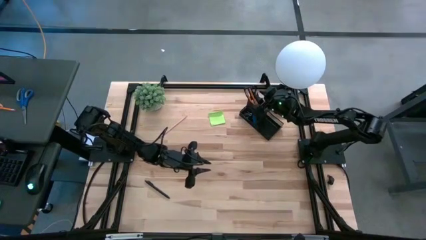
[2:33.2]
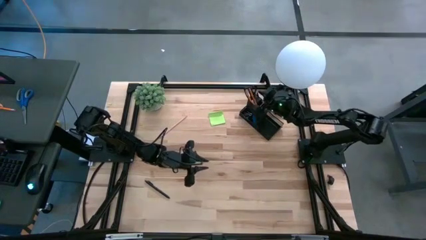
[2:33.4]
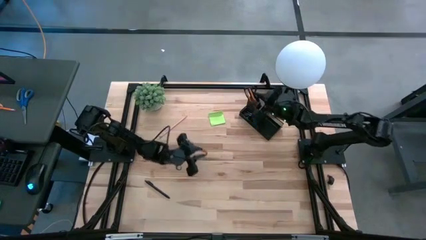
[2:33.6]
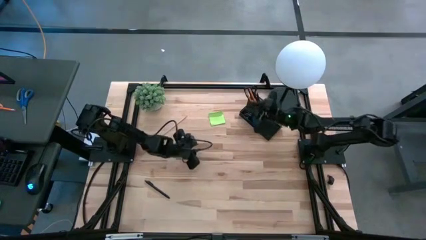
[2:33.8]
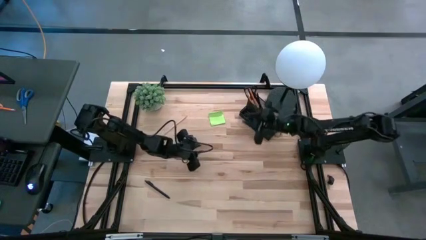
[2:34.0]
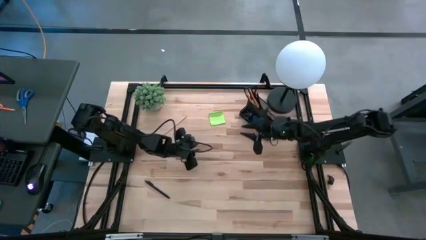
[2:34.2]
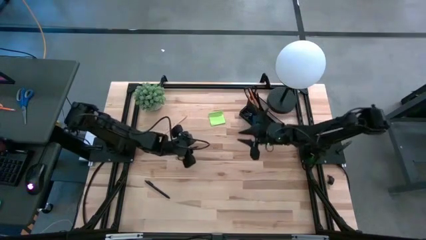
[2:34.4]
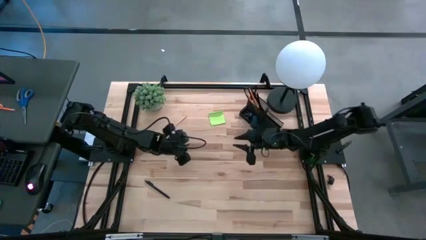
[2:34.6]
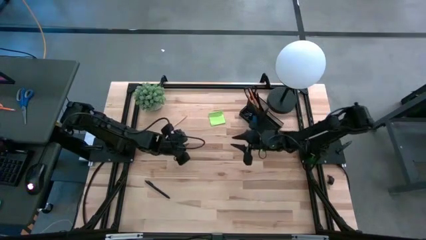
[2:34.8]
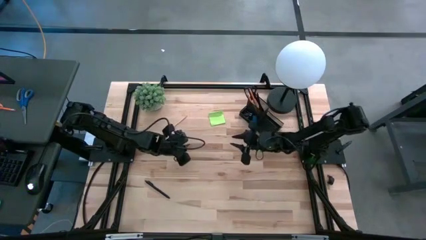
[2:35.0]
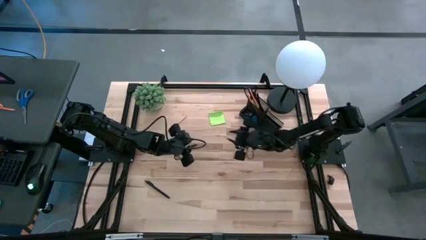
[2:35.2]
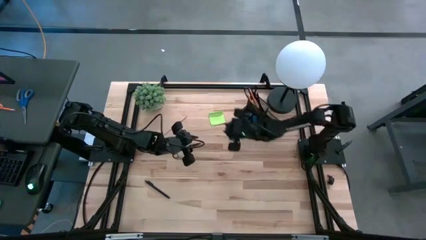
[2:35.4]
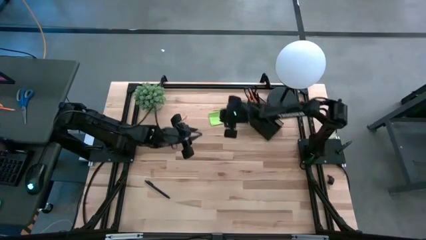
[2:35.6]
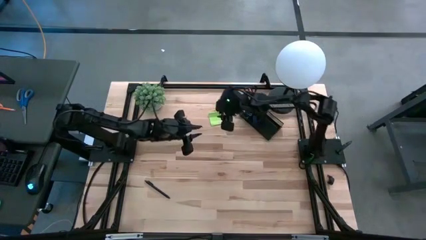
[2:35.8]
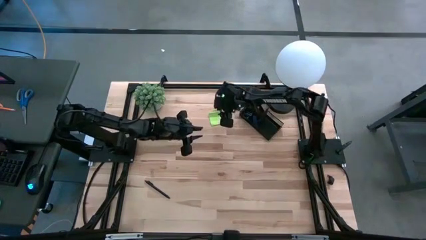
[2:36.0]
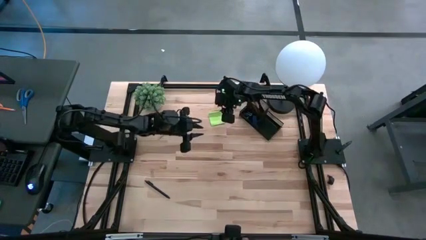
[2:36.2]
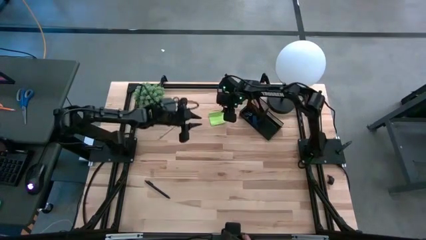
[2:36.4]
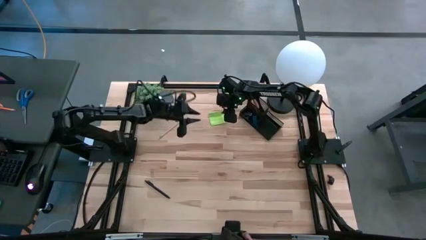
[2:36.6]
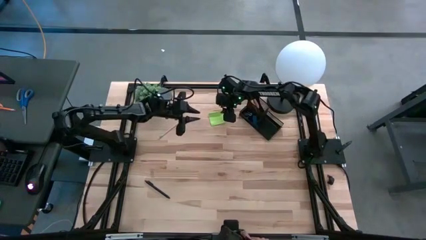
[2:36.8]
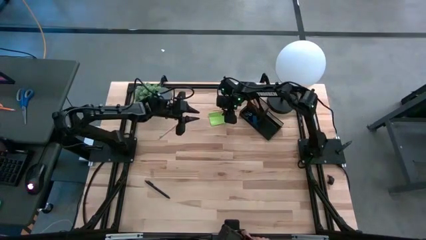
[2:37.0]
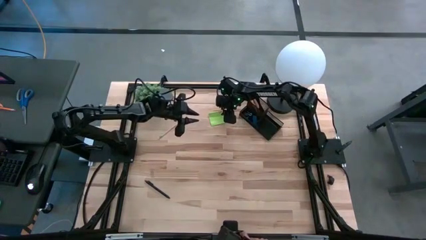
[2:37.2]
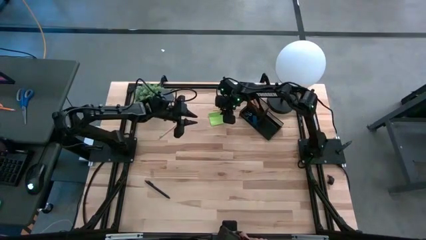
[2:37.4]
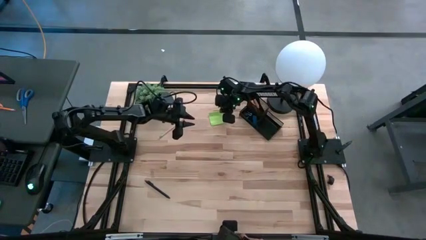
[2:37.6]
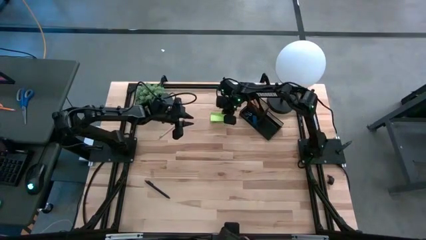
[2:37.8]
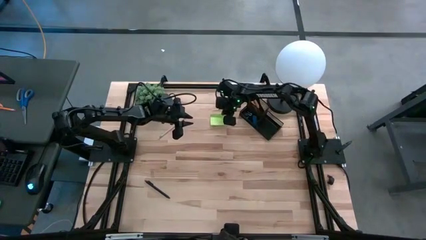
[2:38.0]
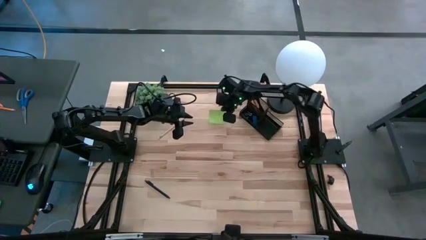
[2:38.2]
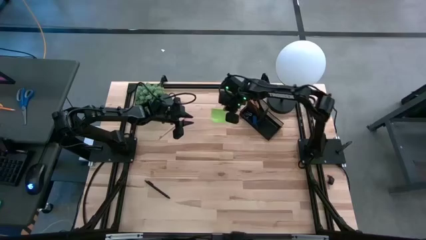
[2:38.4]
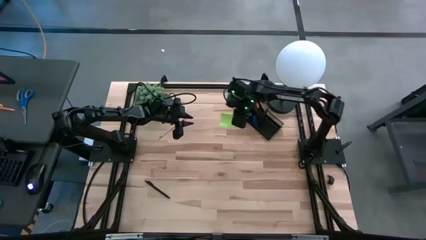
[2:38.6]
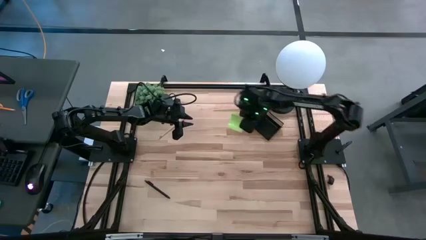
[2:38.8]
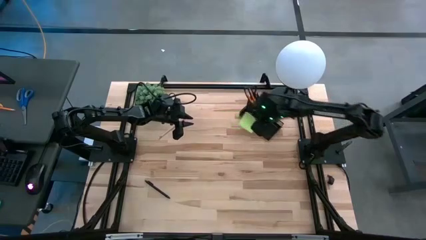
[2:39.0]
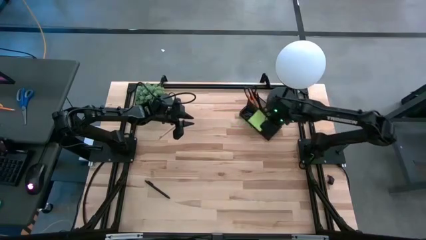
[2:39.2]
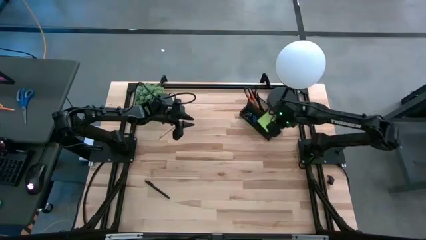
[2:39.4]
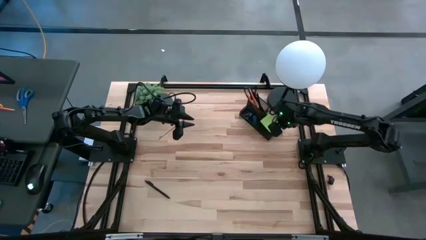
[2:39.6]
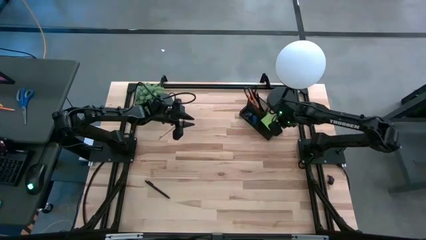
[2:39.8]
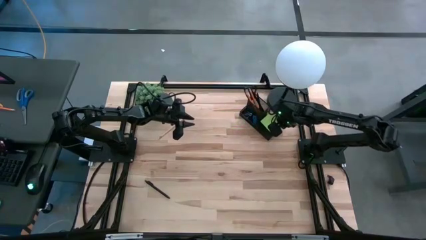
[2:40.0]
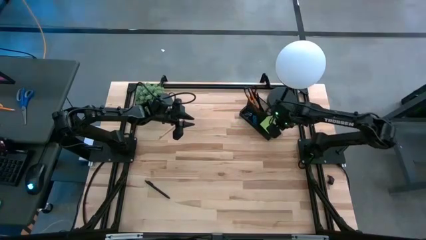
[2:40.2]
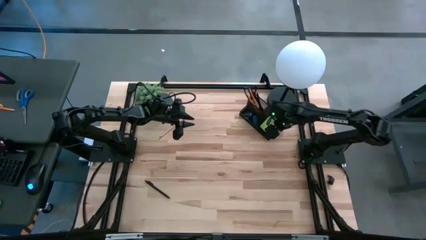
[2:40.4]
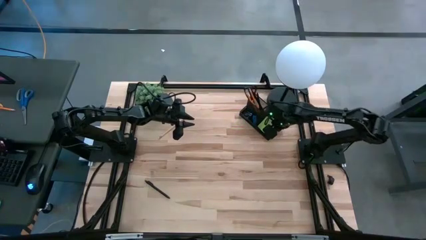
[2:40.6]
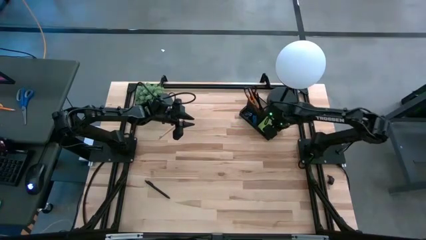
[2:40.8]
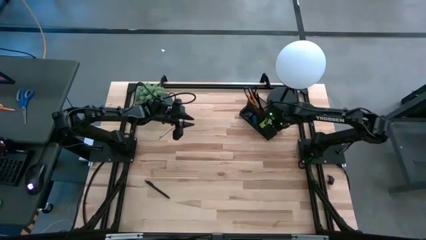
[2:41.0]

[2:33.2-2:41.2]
Task: Pick and place office supplies into organizer
Put the green sticky notes into the black desk organizer

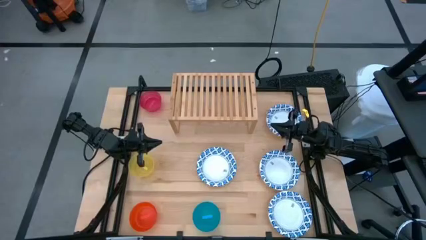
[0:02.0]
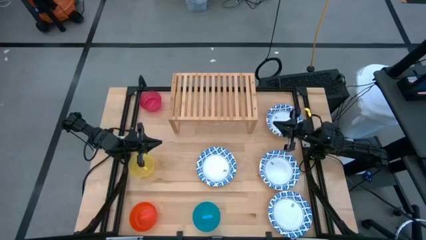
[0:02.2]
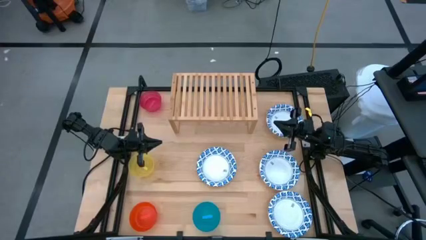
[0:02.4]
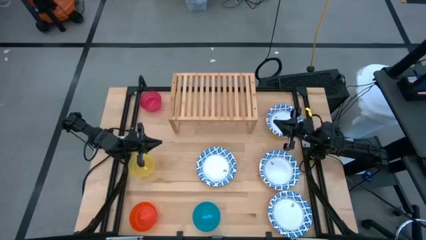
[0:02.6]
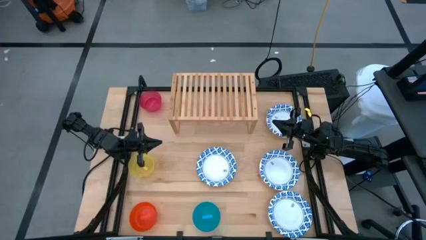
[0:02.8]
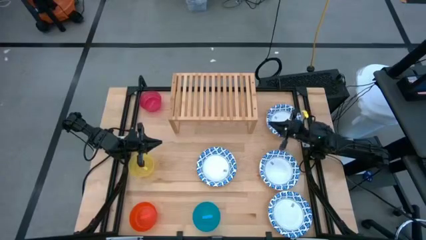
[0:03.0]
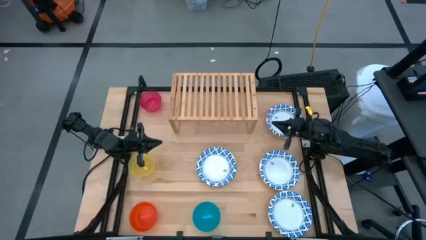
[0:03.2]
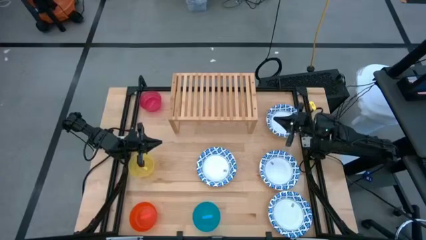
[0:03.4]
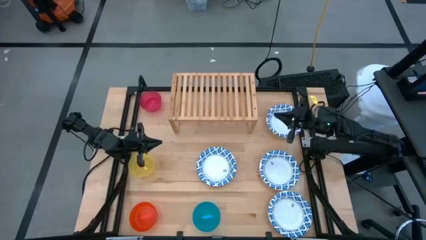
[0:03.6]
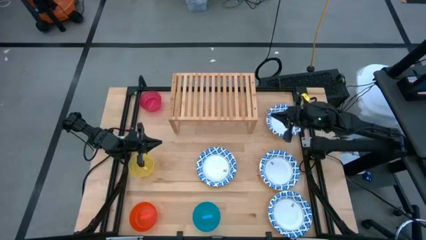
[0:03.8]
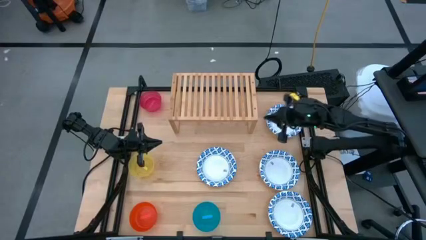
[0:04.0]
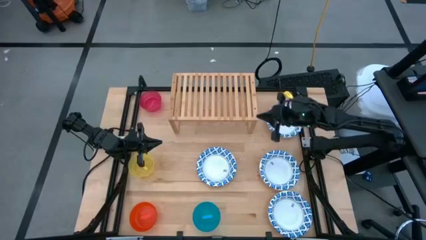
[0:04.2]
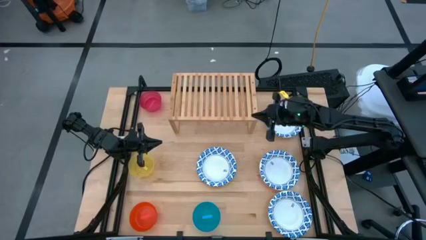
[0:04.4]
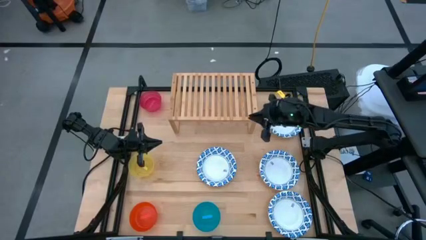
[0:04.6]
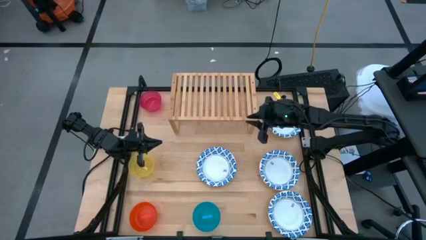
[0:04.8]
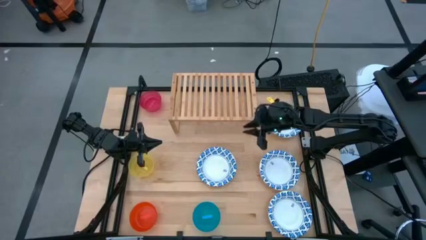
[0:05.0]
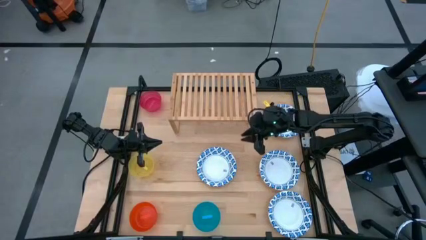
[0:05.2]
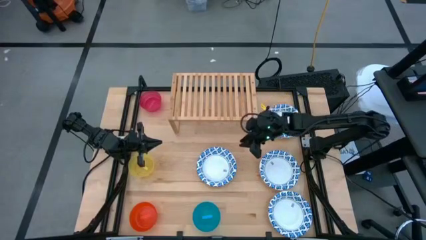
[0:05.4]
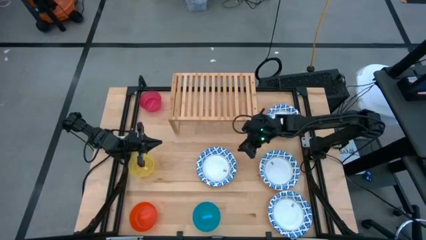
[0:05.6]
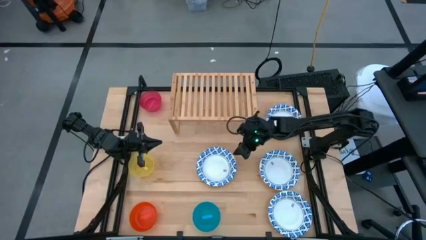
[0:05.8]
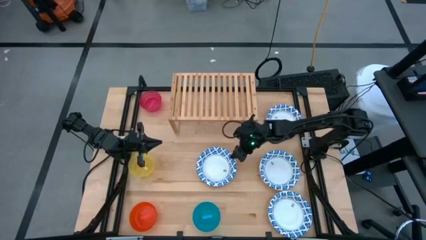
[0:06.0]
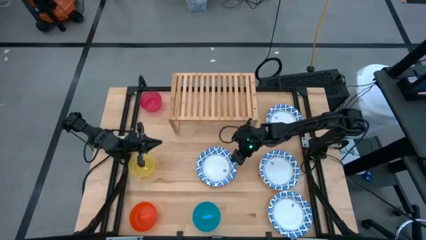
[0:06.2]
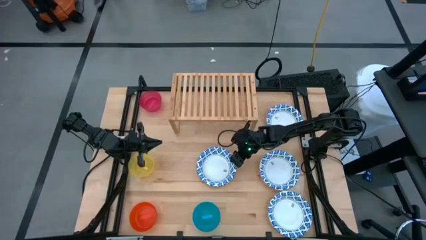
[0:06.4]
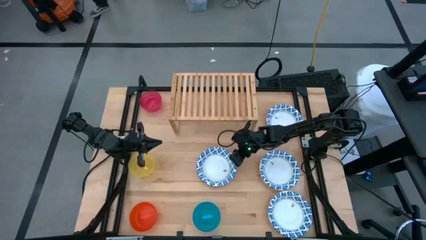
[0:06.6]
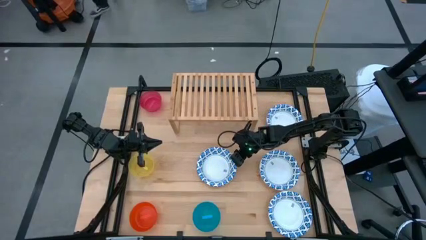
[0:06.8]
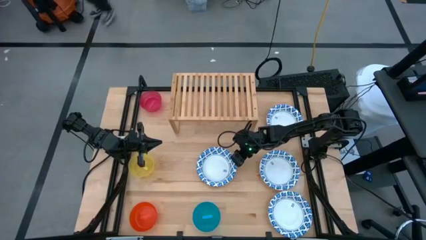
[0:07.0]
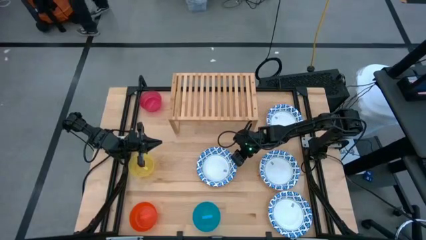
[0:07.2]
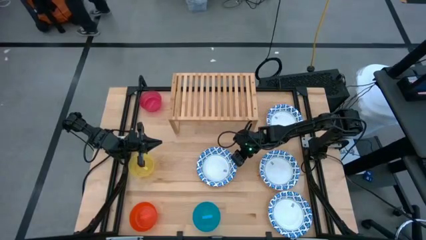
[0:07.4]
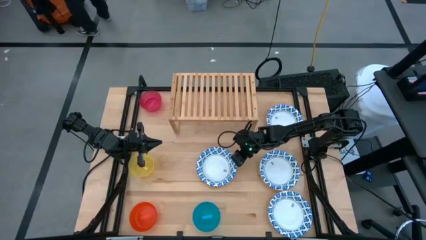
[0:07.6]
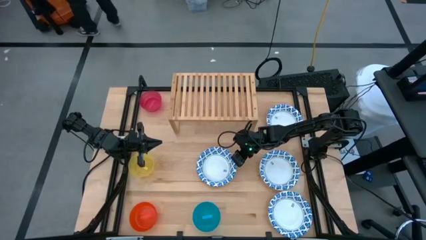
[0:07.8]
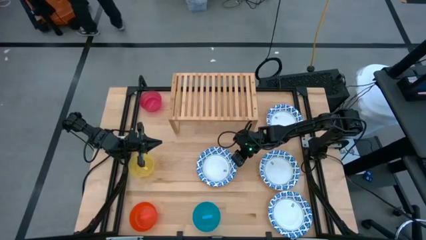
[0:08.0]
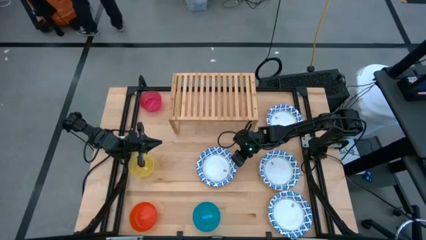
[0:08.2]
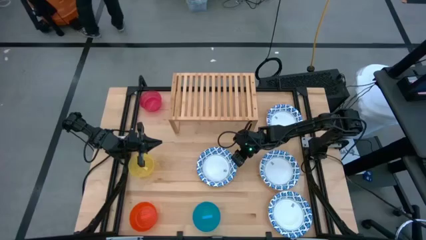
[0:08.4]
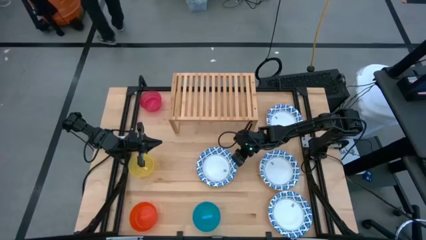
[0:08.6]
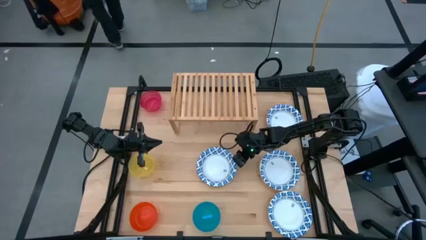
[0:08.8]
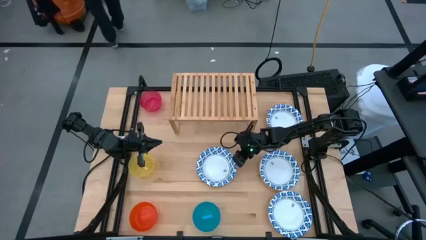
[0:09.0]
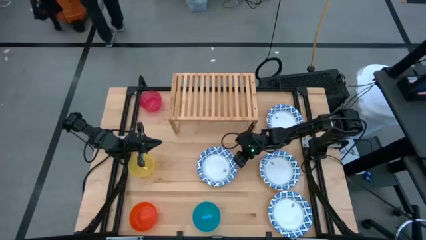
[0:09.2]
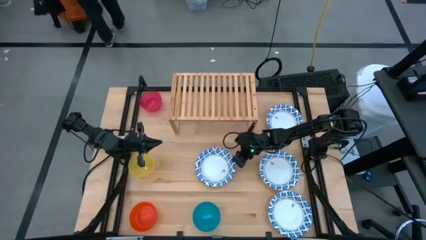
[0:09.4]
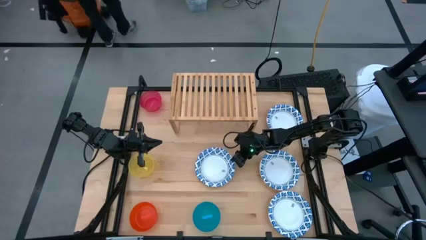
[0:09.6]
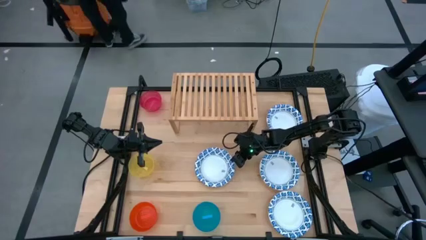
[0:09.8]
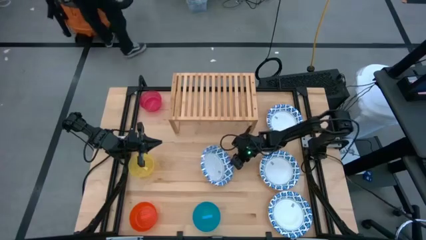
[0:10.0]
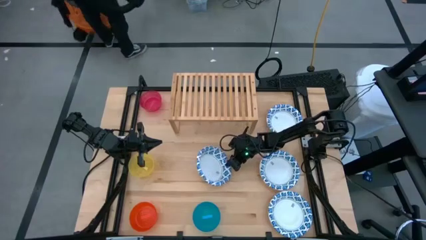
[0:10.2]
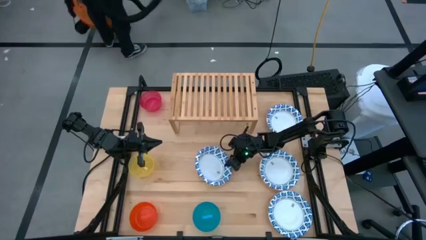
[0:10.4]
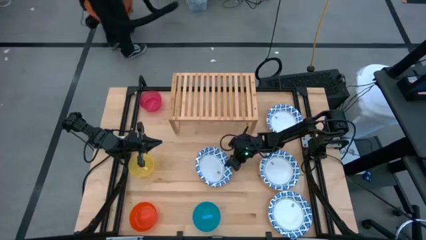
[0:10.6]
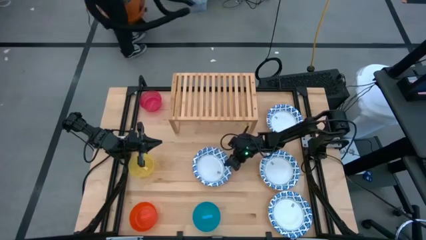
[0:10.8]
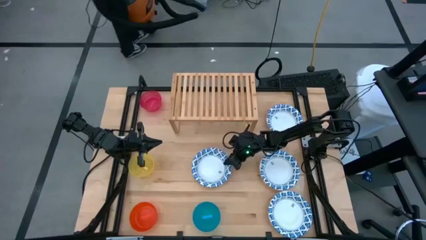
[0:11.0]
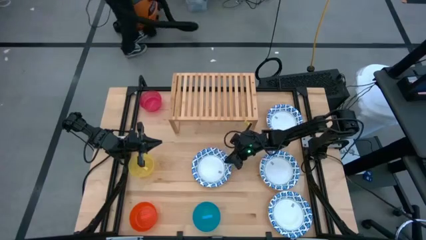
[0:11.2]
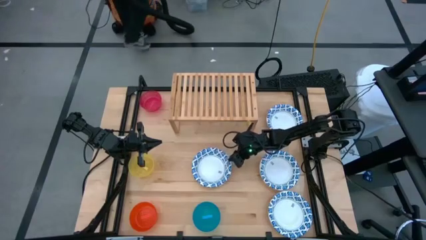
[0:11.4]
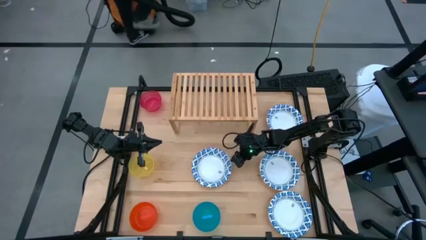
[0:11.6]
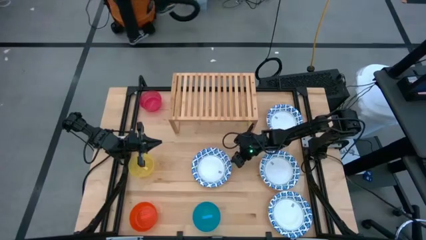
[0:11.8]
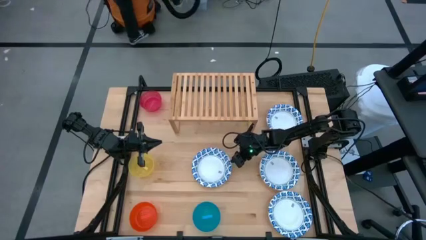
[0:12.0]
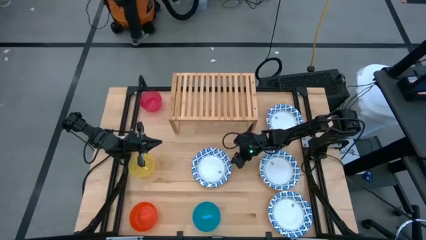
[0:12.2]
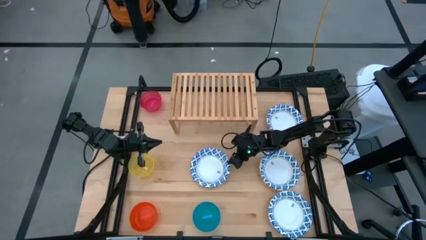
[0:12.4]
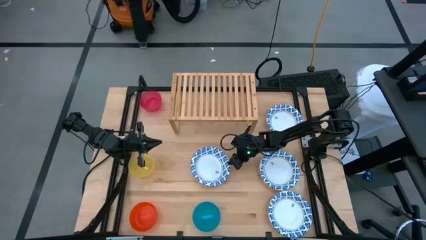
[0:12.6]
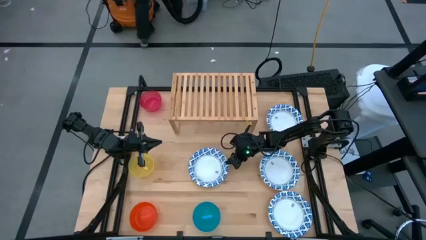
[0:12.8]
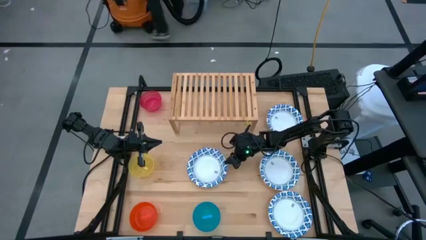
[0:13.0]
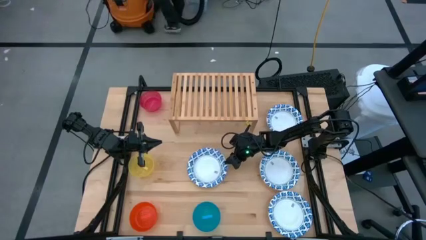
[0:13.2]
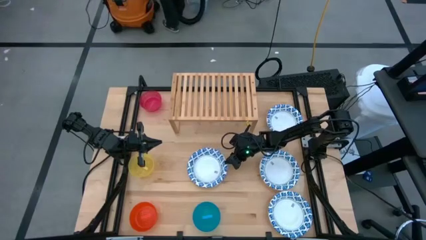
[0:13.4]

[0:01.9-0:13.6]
Task: Place and stack bowls onto a shelf
Put the white bowl on the shelf
